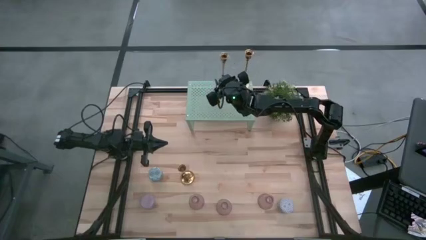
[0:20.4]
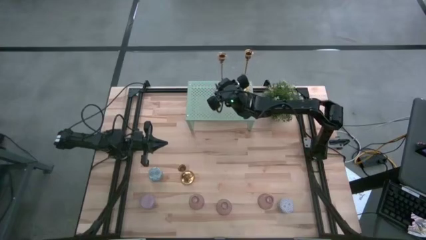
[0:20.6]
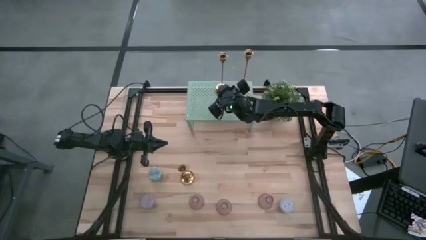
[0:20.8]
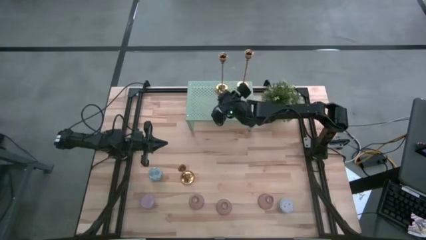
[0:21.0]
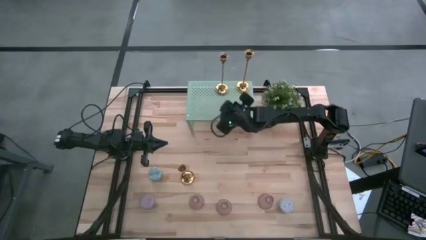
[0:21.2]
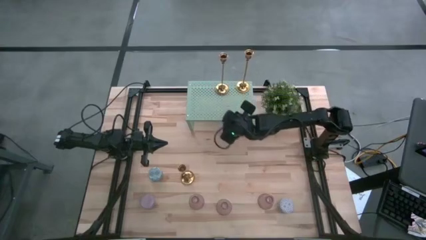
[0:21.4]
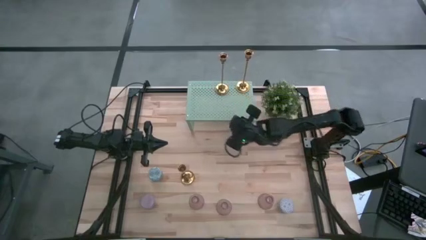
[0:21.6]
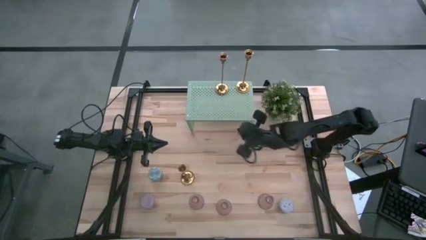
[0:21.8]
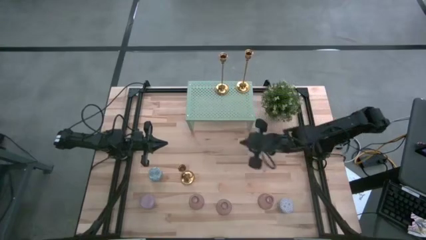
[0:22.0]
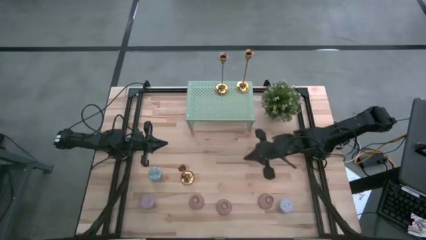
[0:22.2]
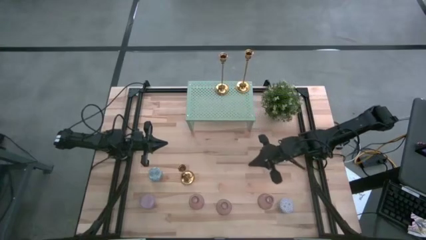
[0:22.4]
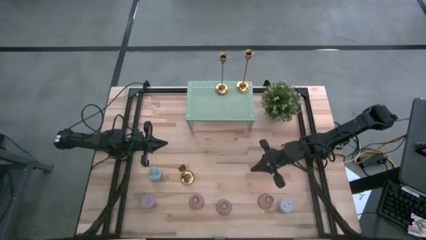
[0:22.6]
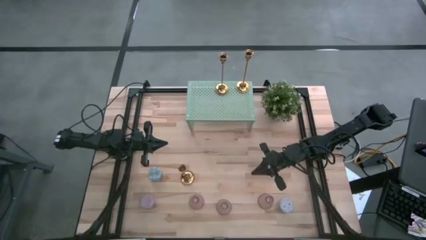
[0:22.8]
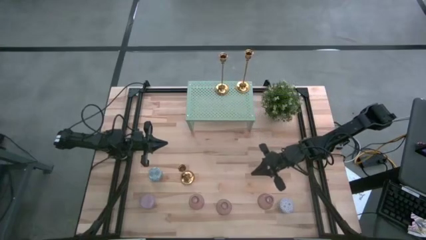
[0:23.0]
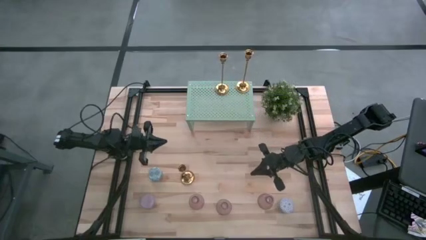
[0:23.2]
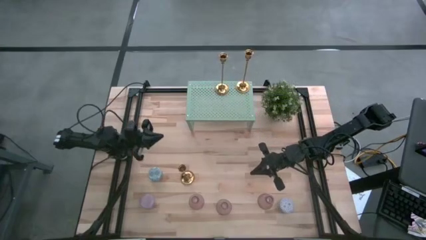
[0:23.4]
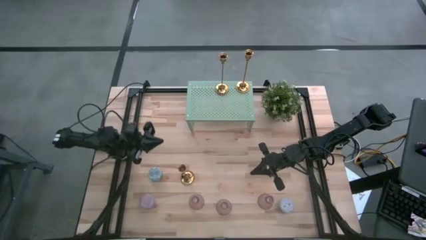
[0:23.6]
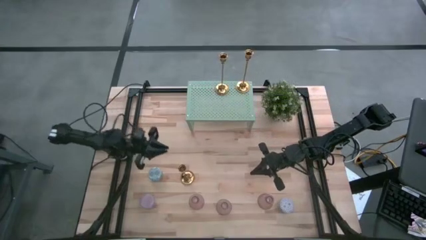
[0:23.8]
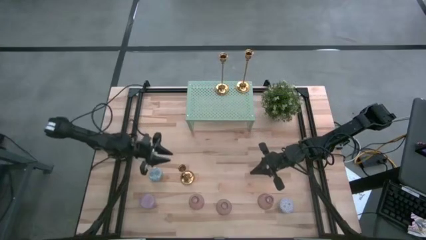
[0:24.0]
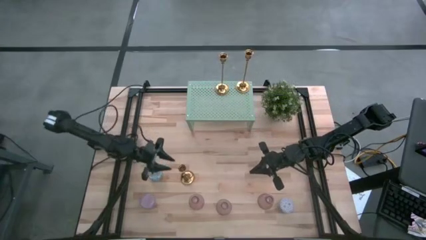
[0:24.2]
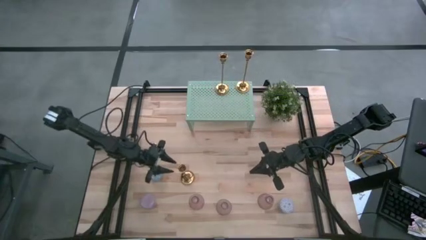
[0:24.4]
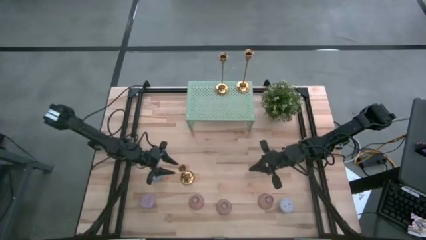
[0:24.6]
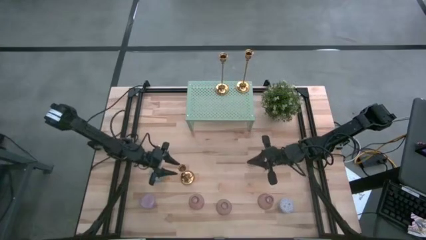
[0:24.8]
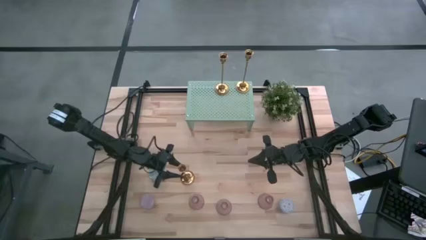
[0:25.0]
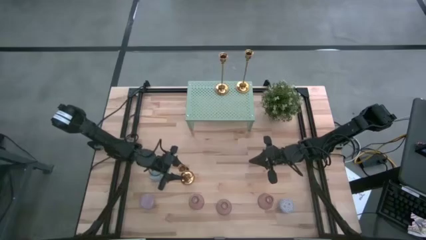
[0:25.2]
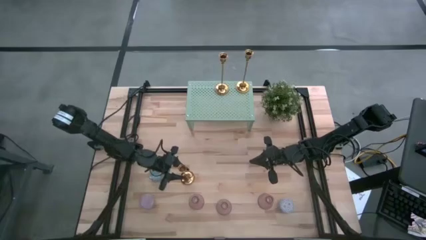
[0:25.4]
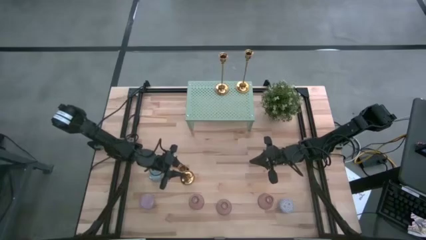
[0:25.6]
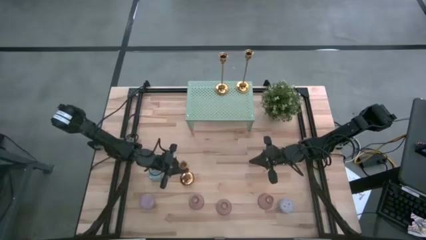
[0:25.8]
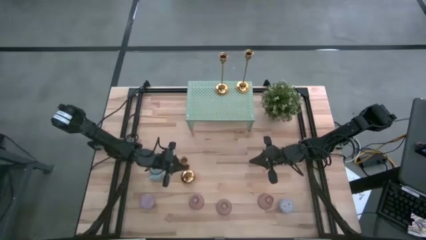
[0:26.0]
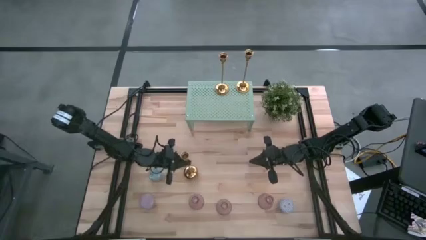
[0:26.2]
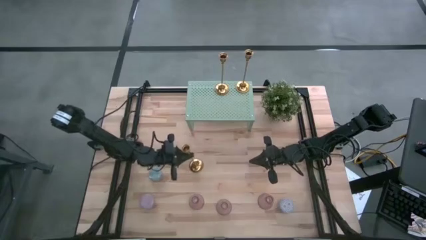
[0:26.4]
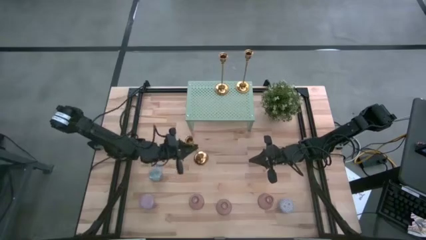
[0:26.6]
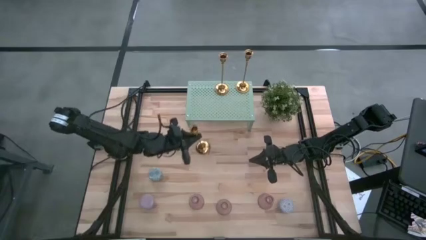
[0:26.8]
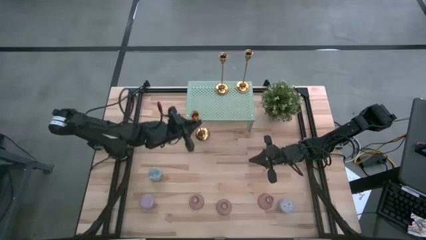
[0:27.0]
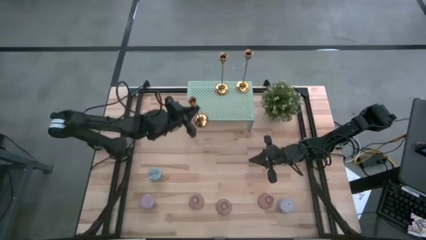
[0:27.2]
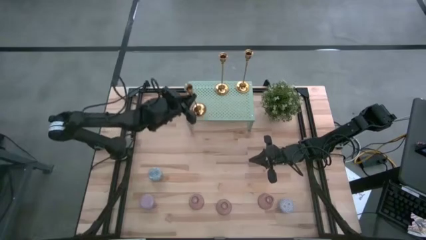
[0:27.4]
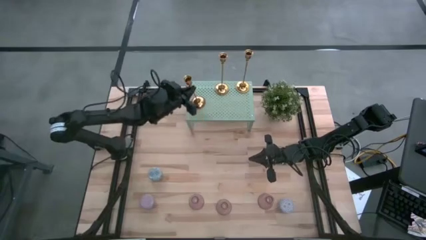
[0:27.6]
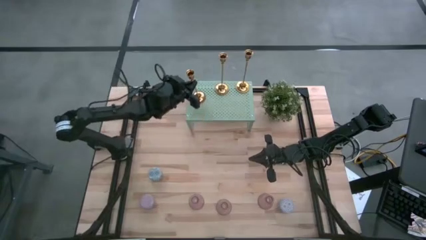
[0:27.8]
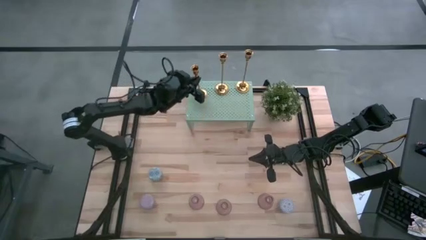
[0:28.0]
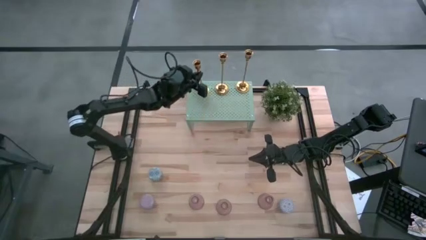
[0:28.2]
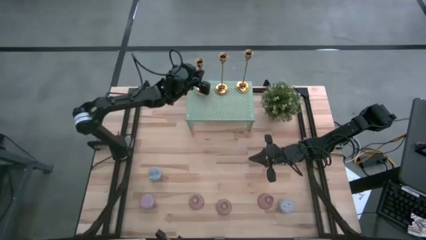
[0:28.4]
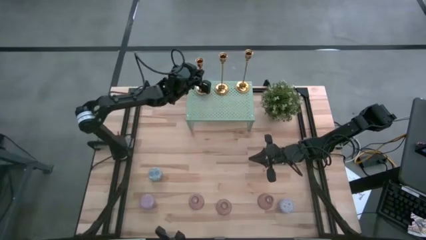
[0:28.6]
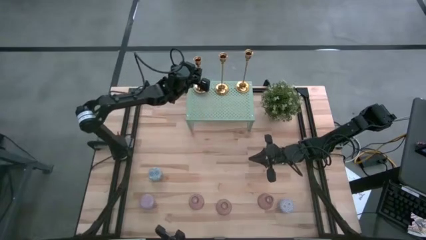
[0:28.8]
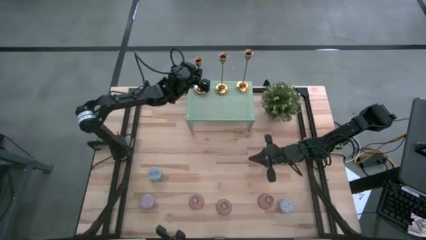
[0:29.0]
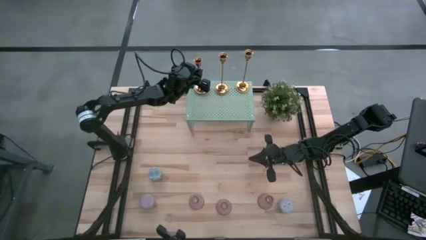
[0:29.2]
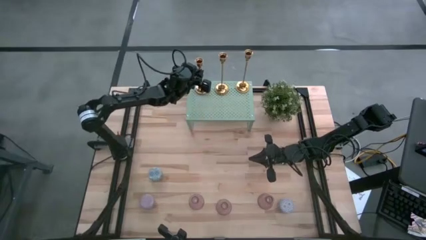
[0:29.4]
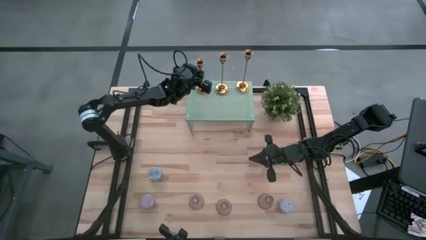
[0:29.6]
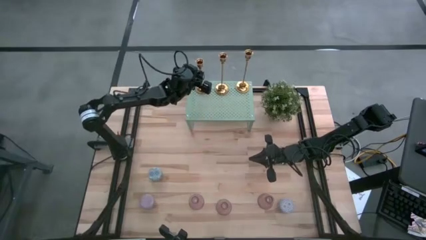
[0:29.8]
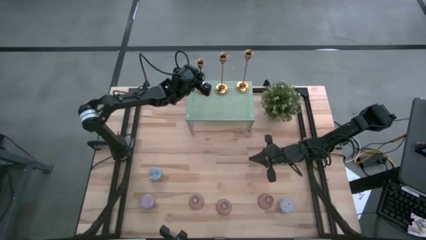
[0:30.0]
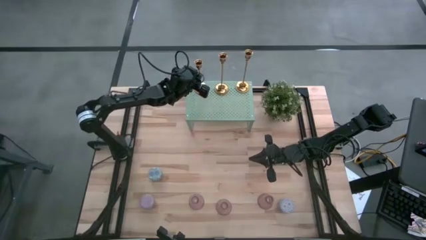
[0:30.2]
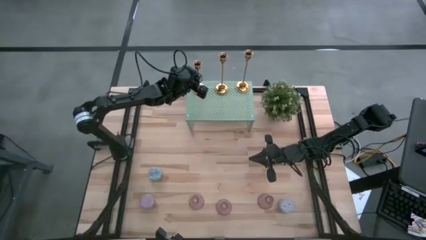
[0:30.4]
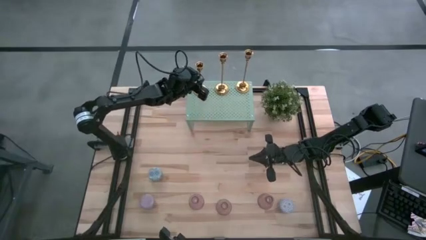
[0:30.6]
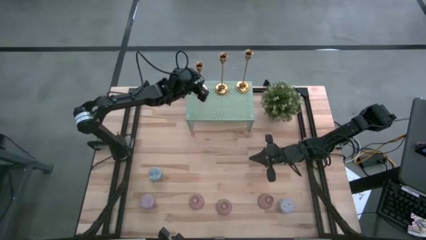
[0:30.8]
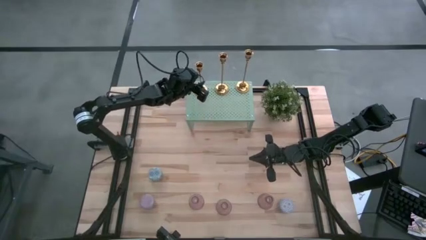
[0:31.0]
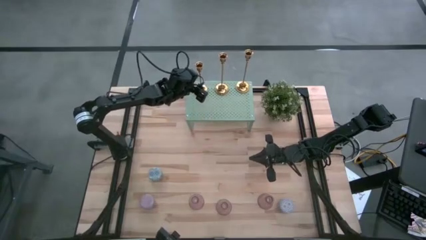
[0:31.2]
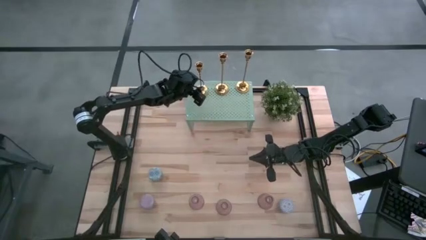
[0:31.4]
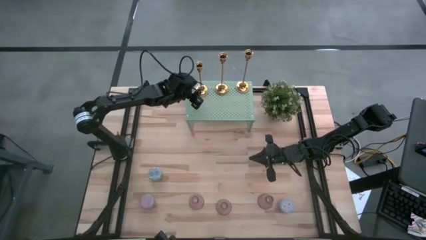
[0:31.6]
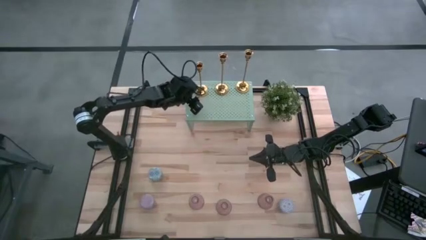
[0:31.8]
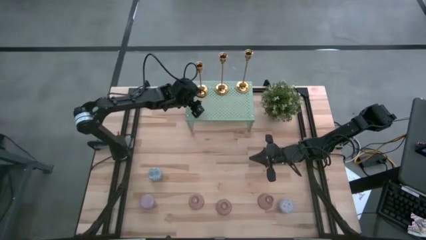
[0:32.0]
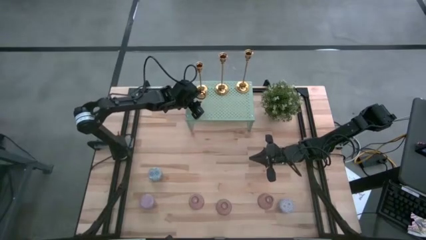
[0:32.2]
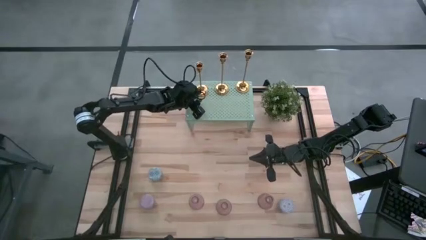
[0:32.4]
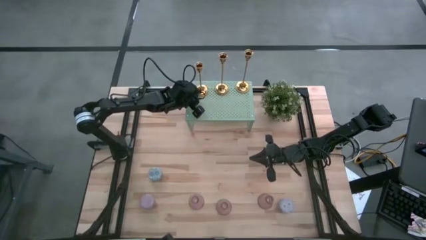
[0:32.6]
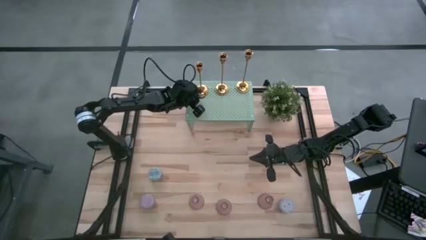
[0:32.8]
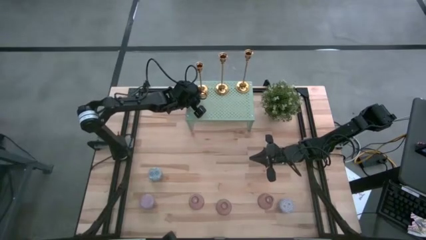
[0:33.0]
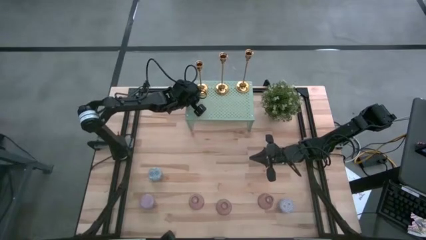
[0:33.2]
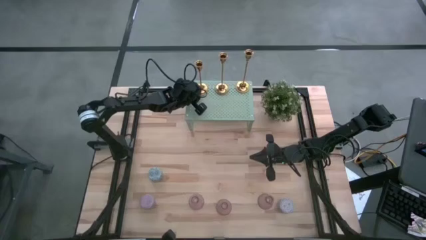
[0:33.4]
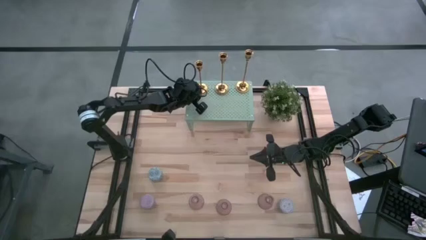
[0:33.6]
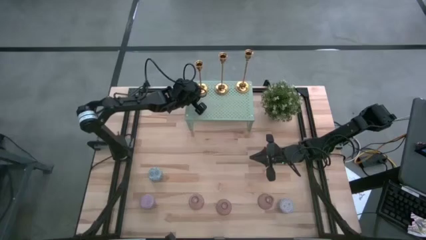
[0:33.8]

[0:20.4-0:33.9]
Task: Pick & Place candle stick holders
Put the gold candle holder on the shelf aligned with the other gold candle holders
